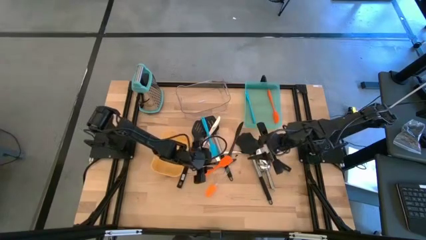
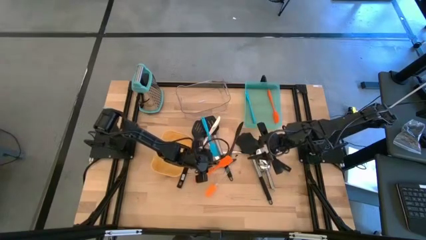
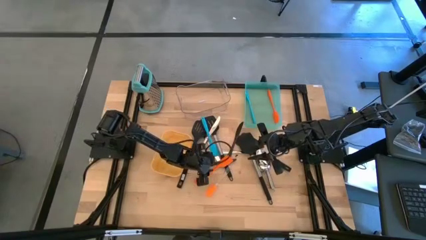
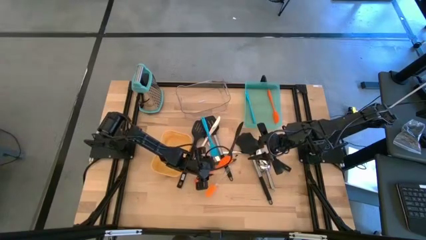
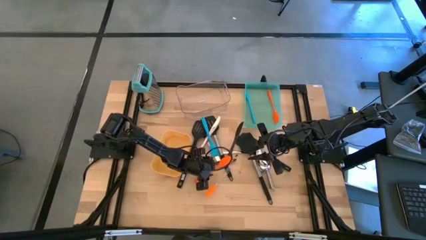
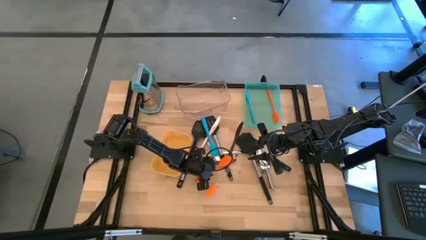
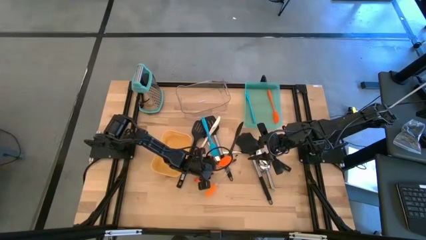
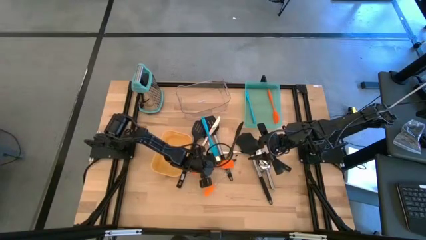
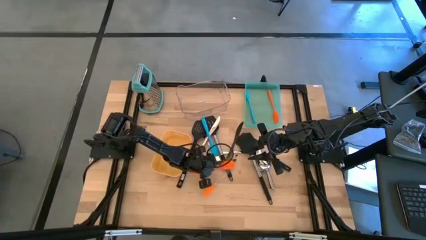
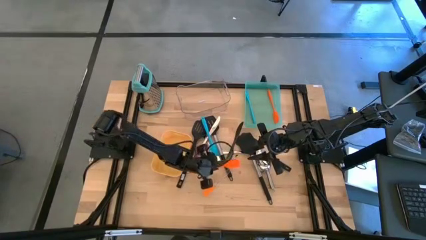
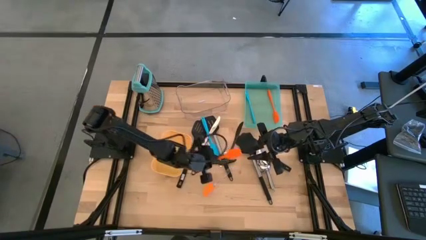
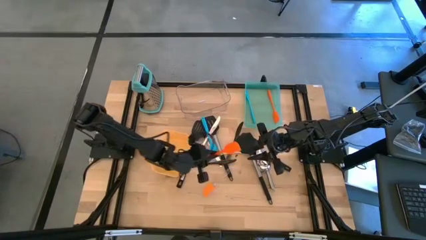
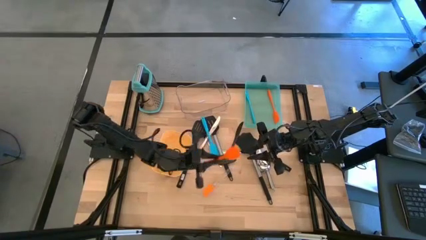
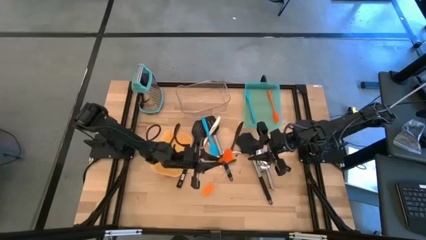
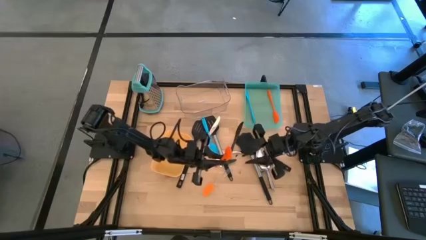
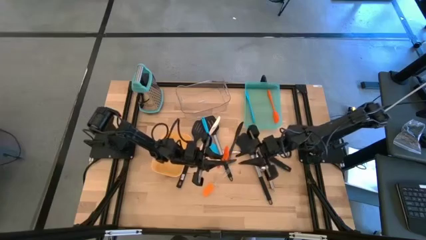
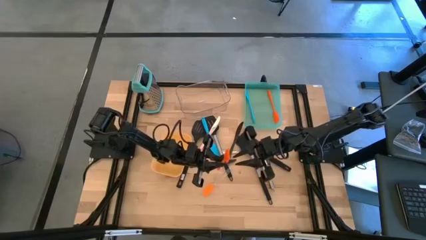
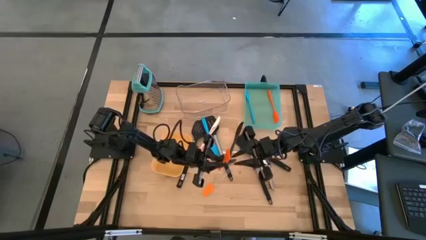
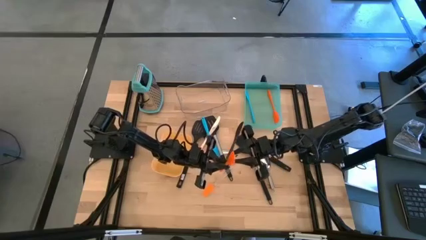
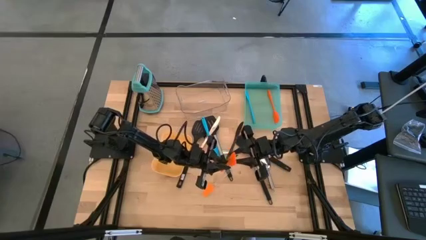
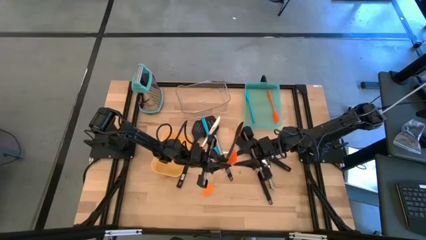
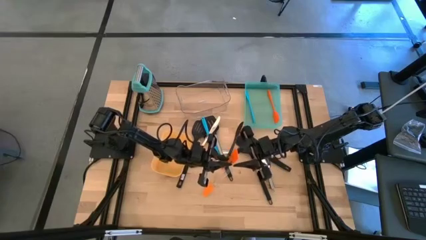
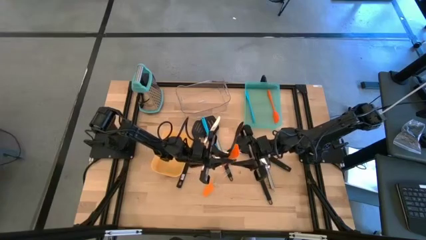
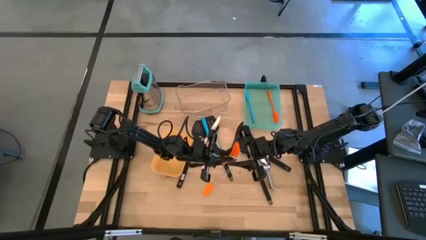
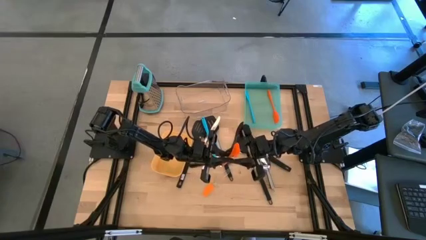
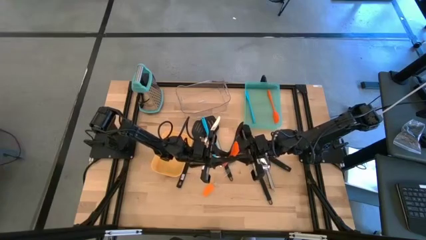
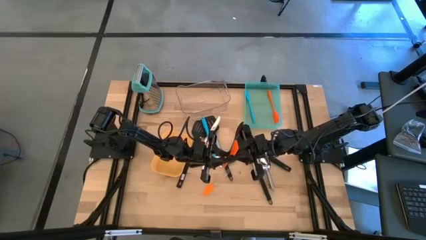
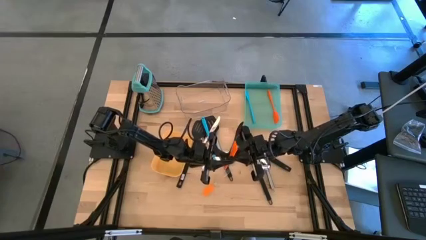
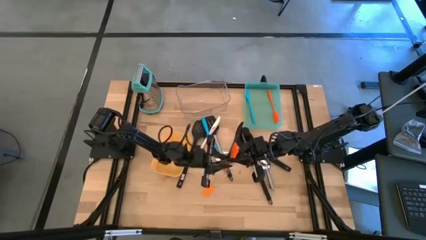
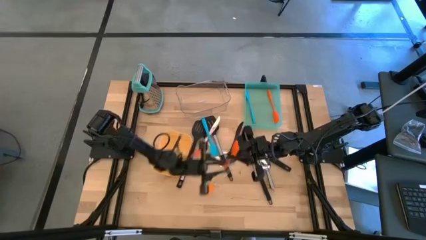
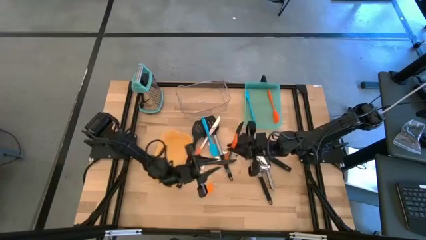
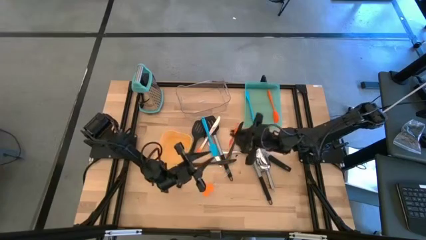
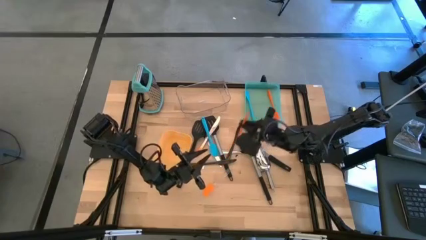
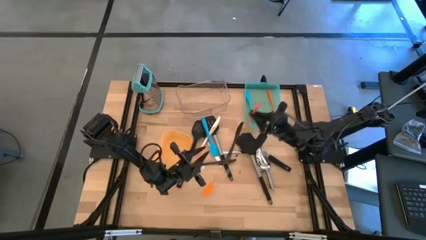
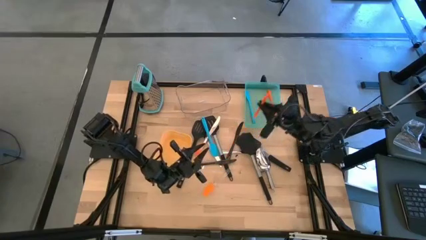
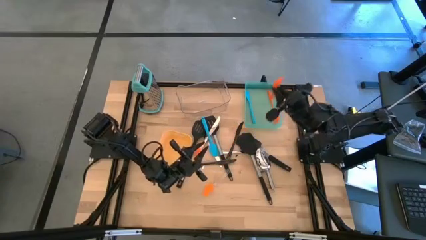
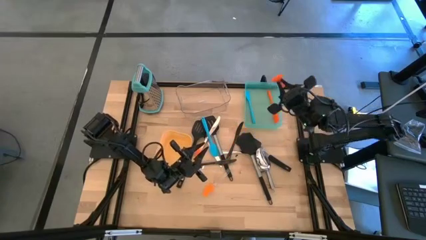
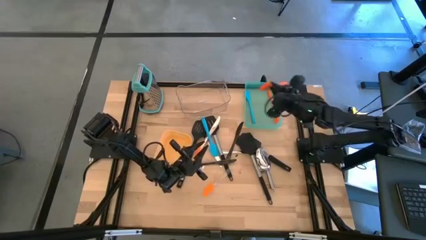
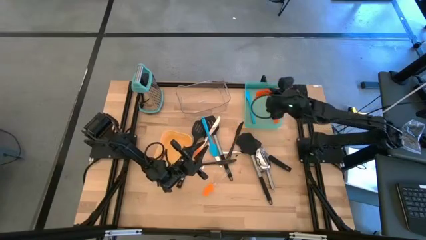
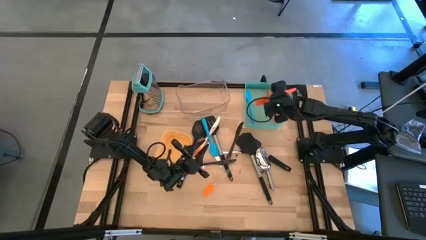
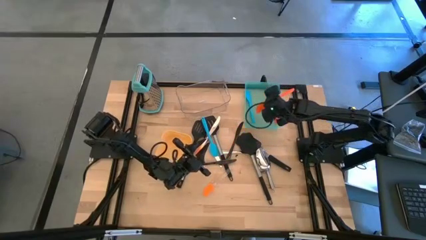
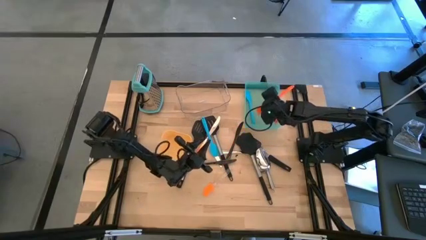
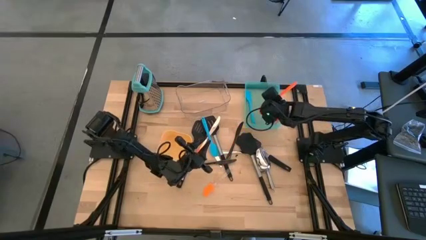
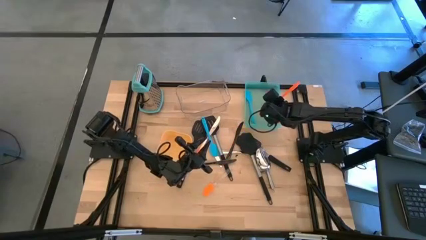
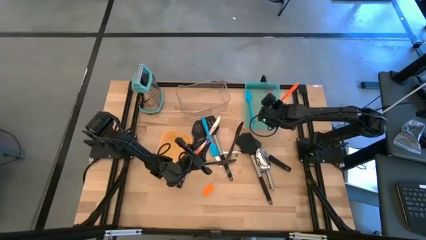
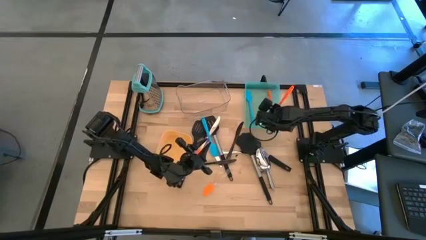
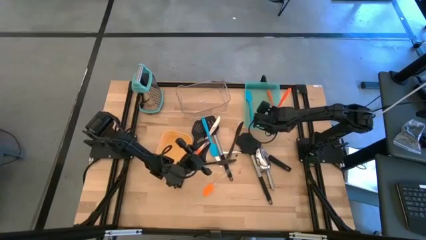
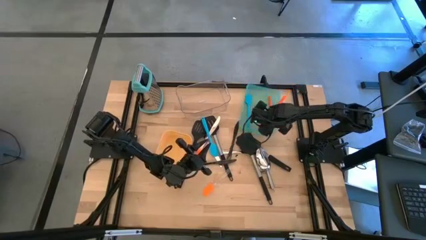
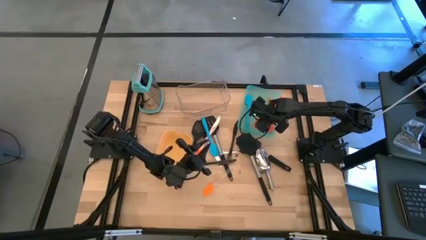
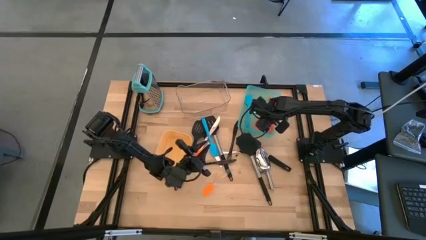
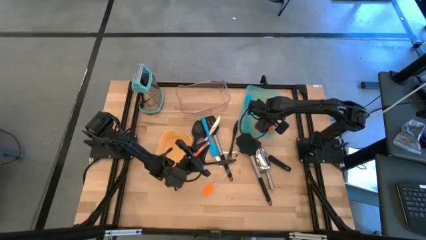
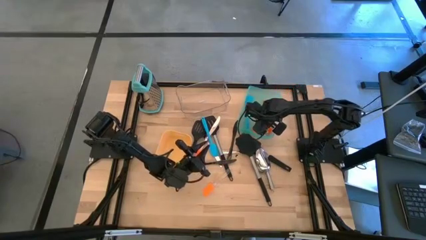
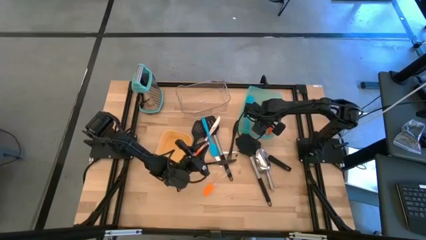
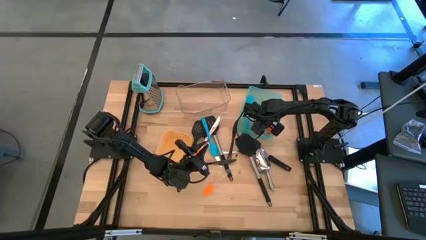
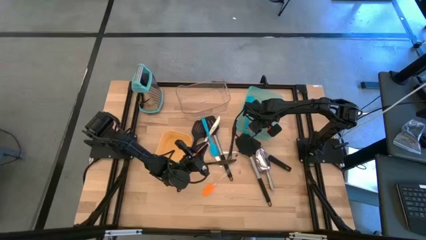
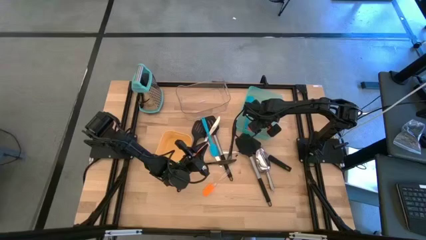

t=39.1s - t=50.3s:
Task: Pick & Place Kitchen Items
Put the orange spatula into the green bin
